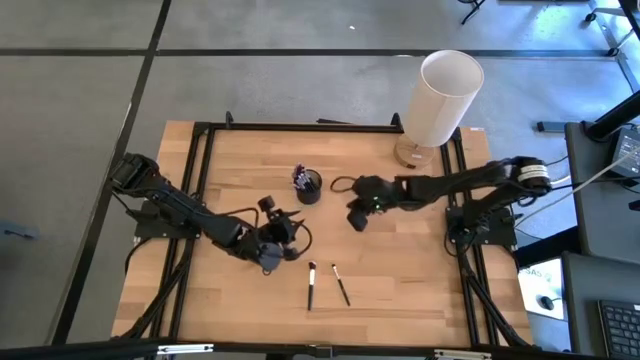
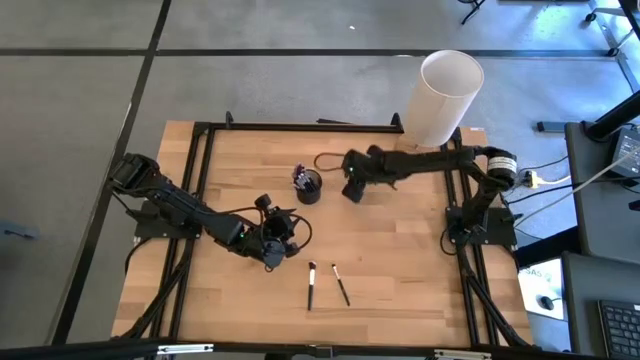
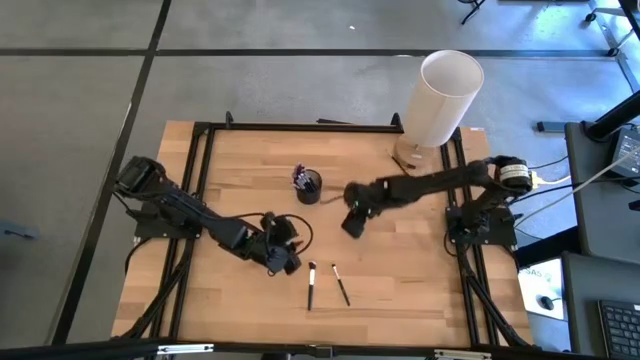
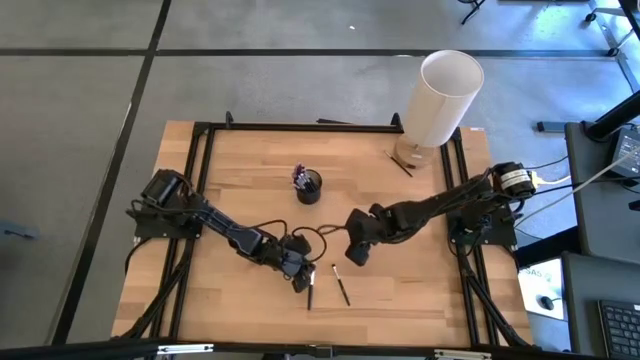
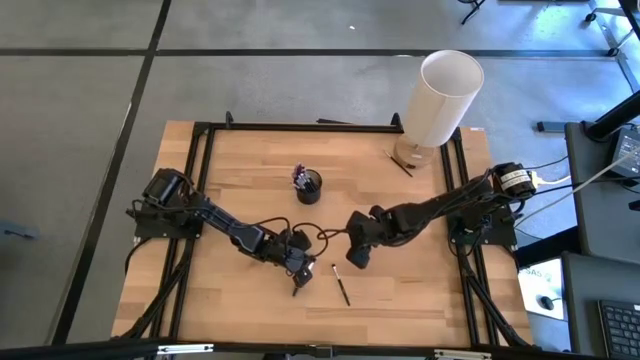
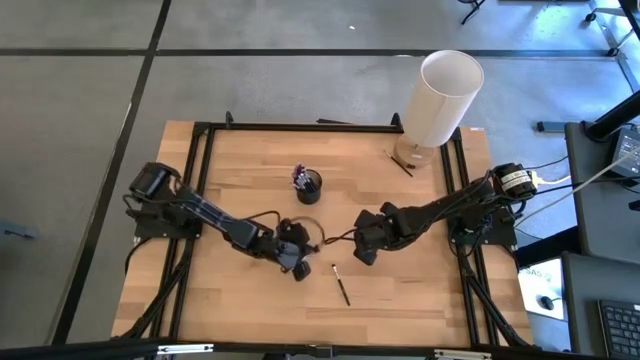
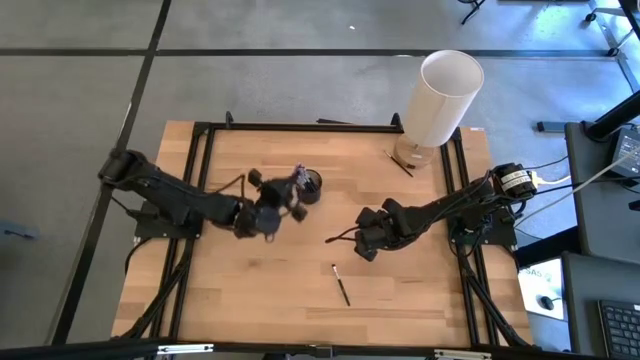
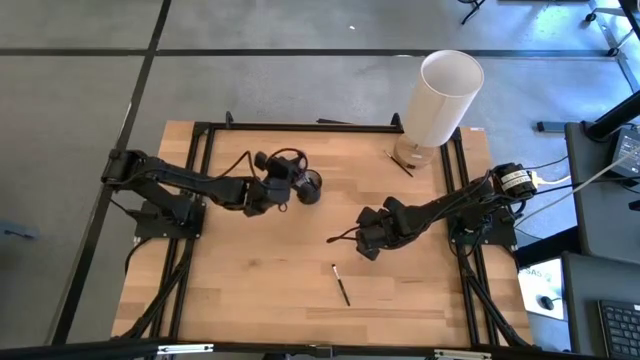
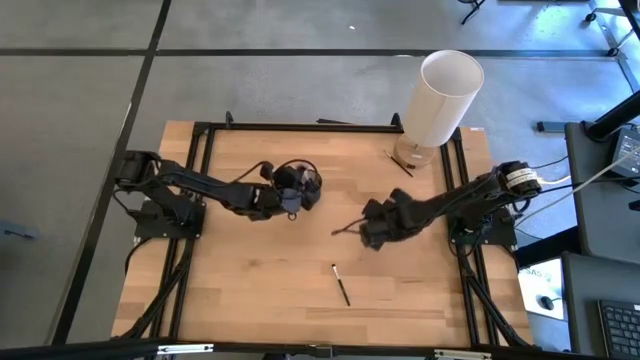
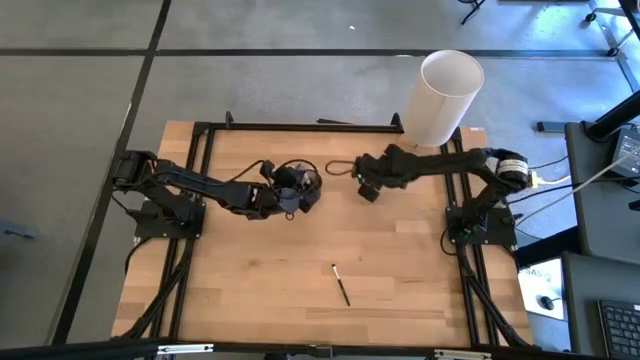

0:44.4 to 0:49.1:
Task: Put items in baskets/containers
Put the black powder brush into the black pen holder

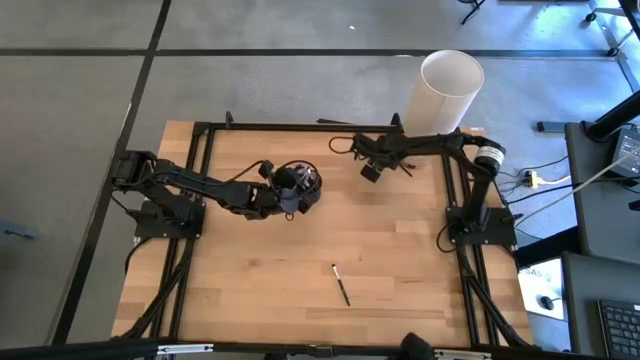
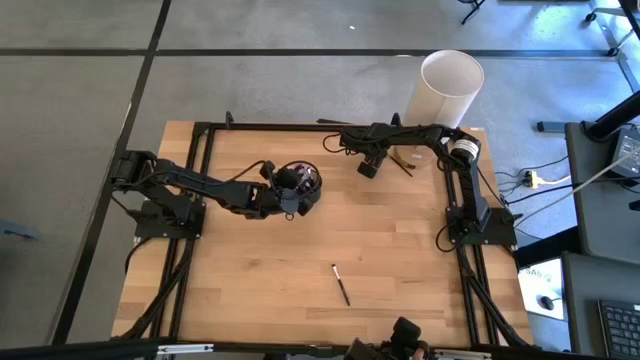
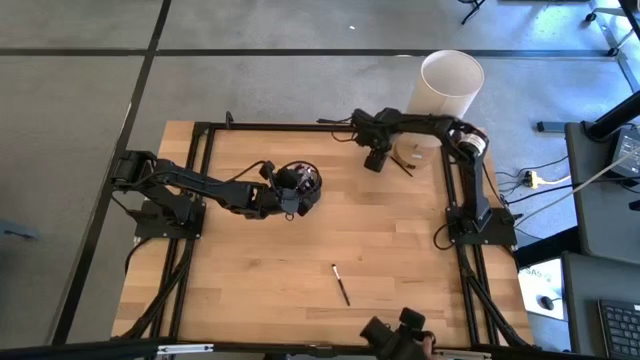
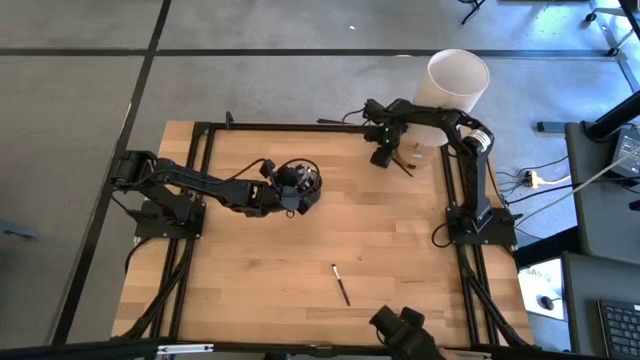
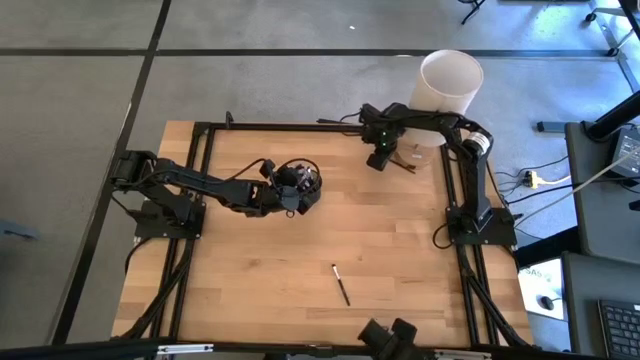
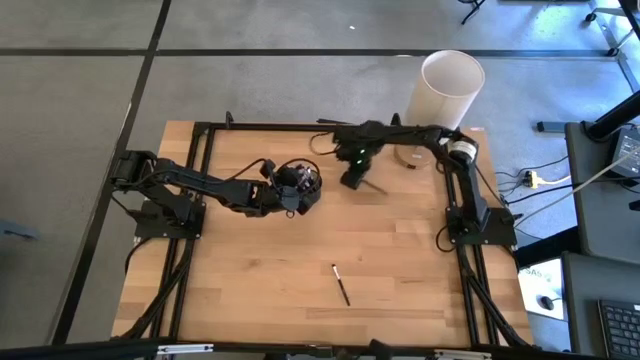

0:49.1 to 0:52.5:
Put the black eyeshadow brush into the black pen holder

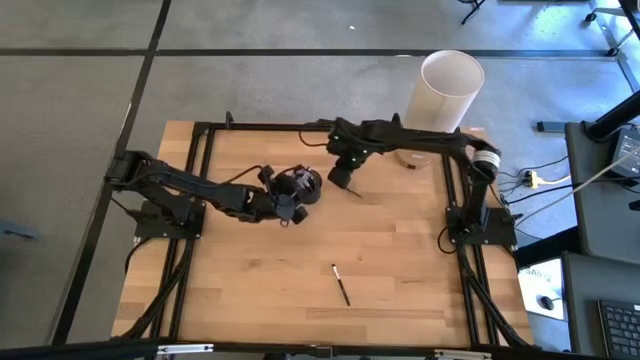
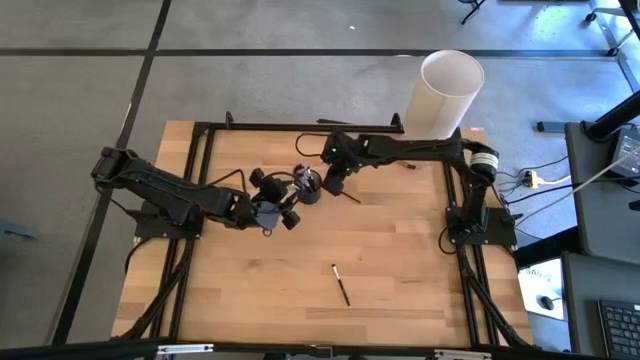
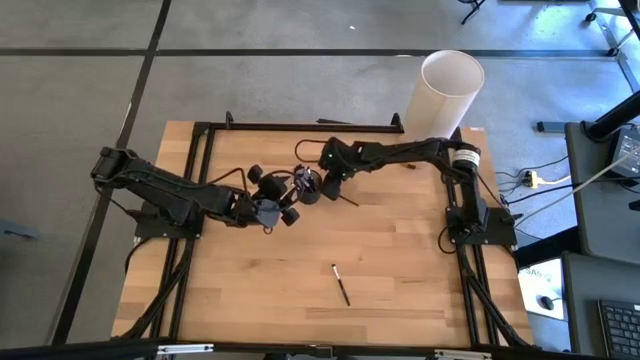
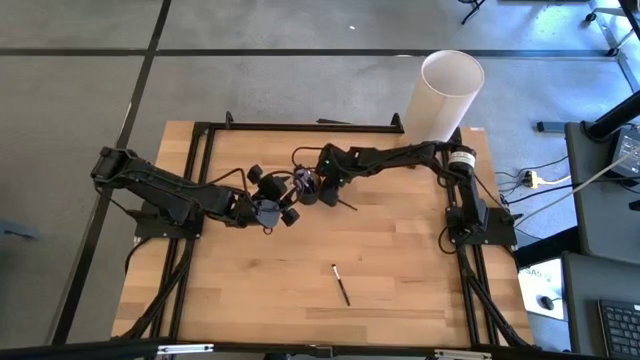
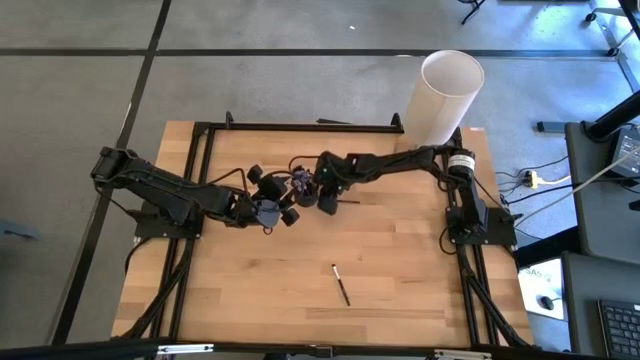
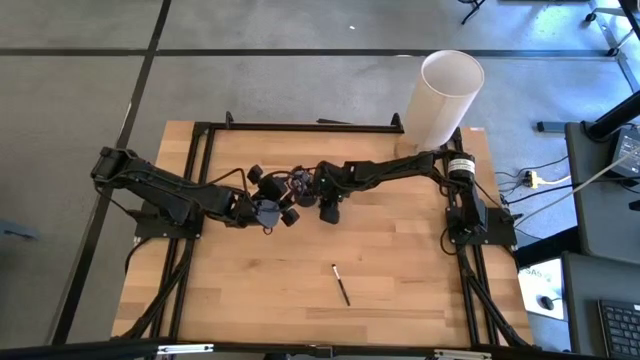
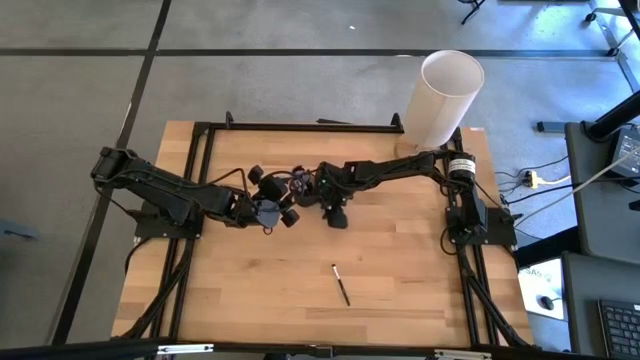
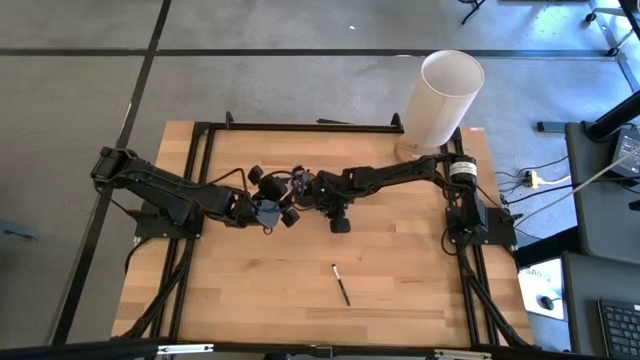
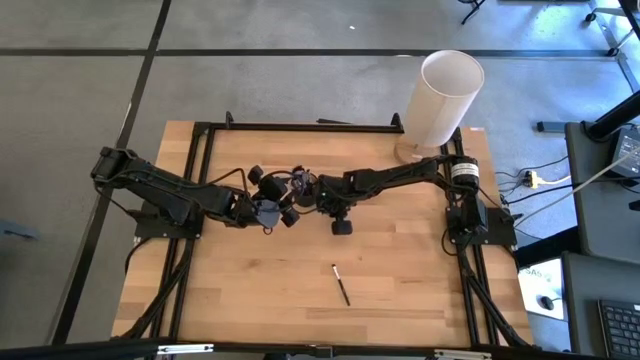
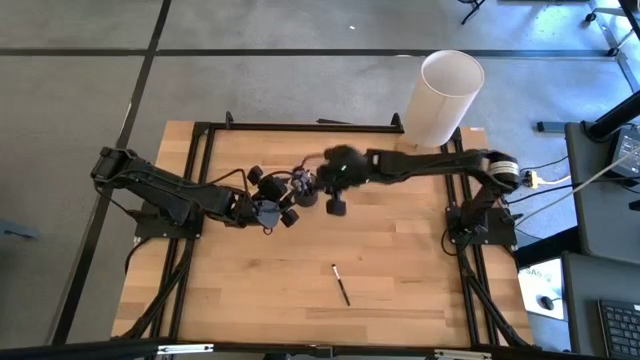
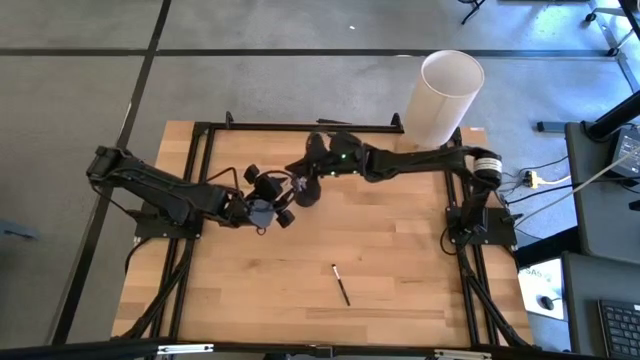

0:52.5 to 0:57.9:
Put the black eyeshadow brush into the black pen holder

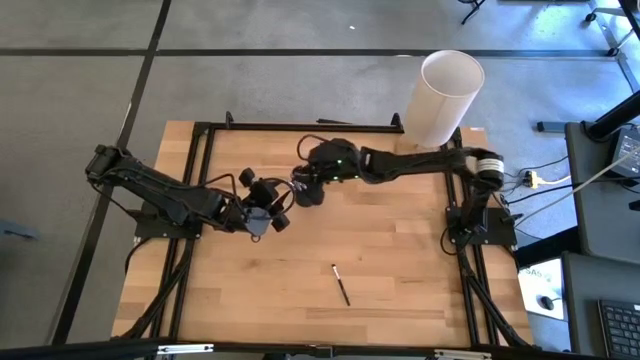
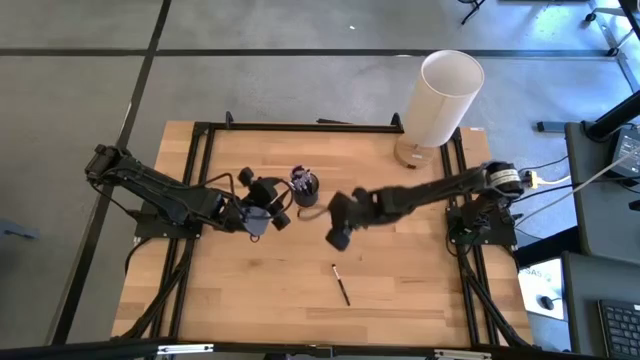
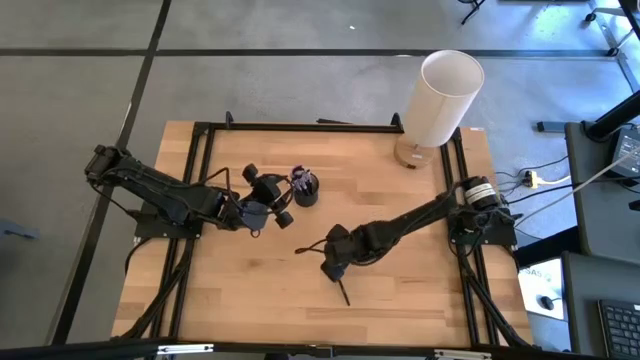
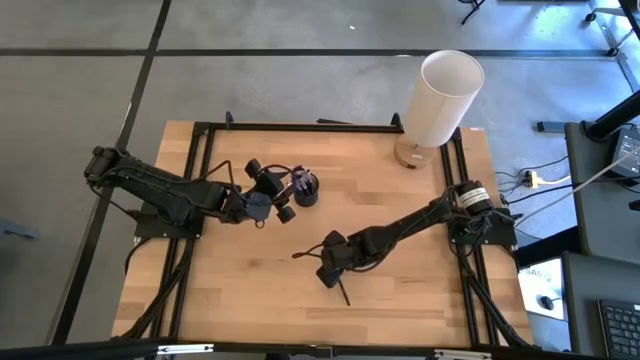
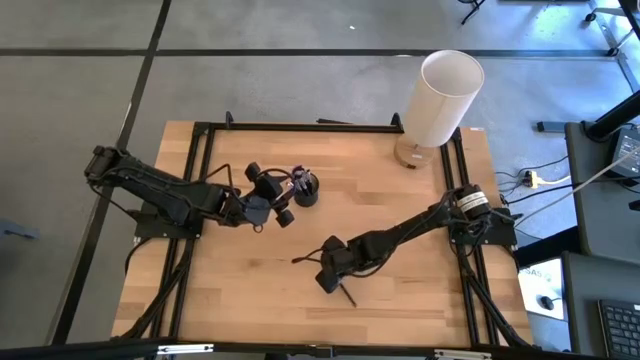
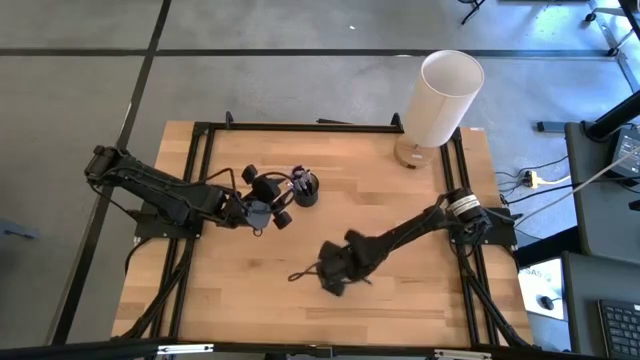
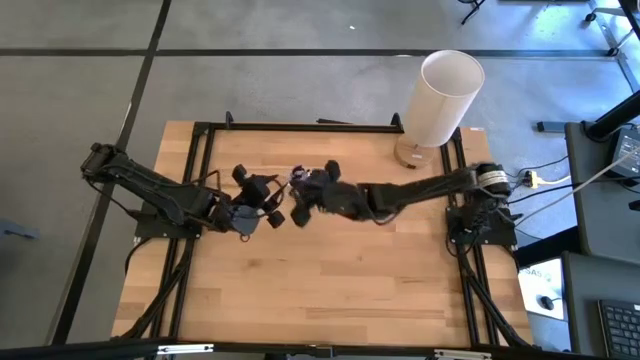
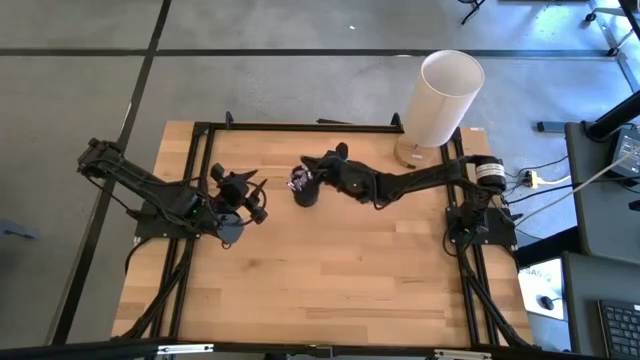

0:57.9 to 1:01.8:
Put the black eyeshadow brush into the black pen holder

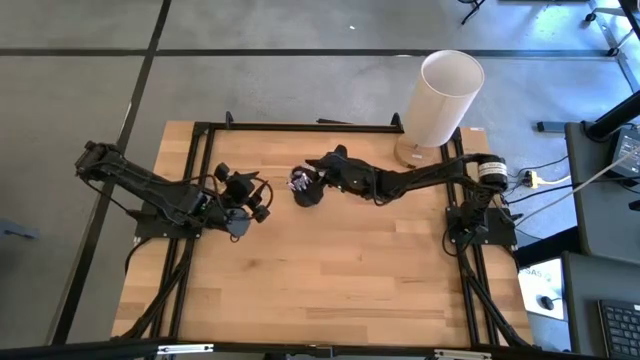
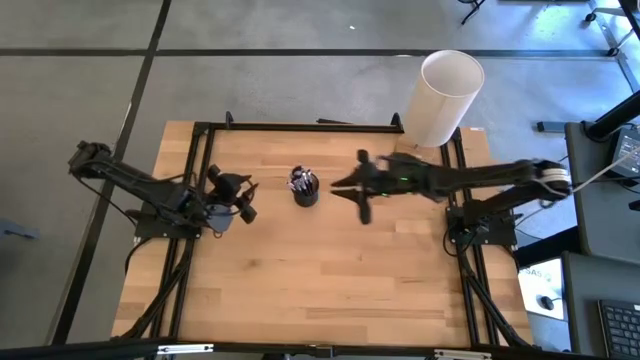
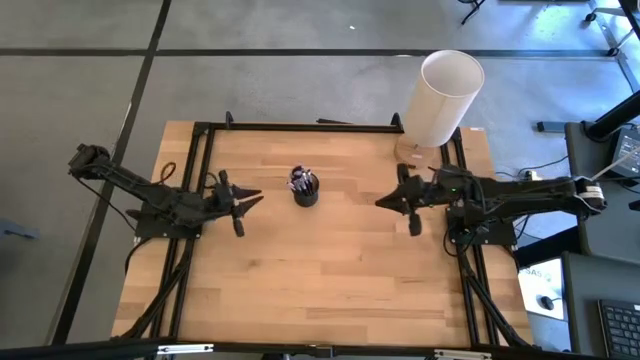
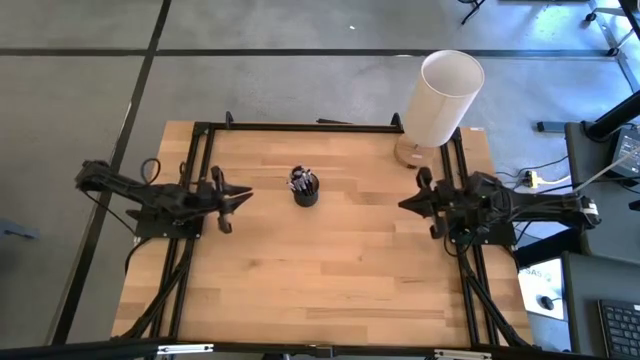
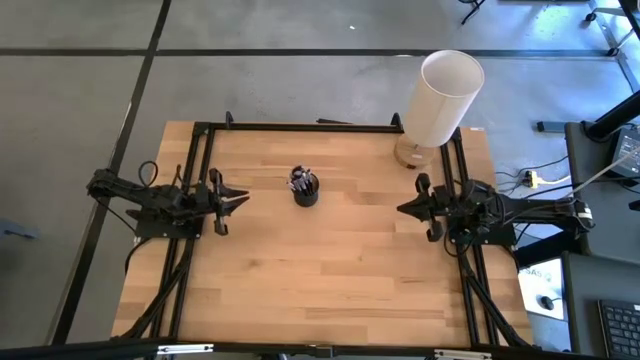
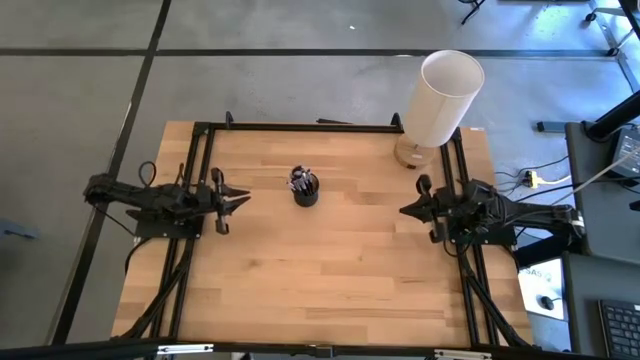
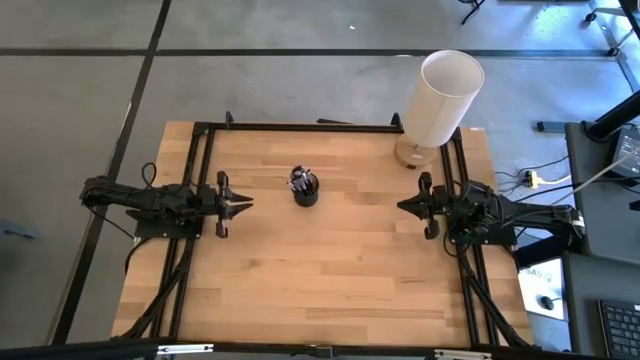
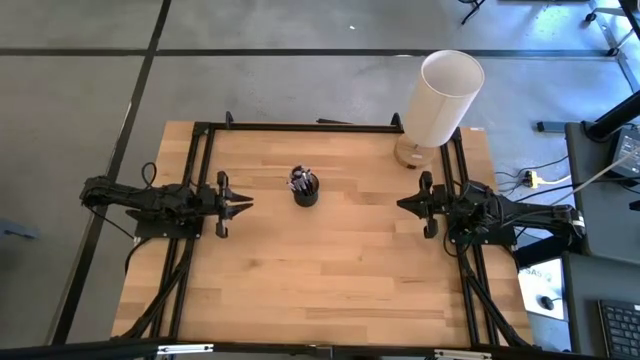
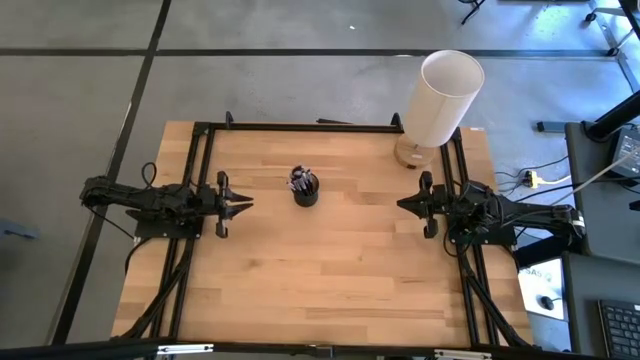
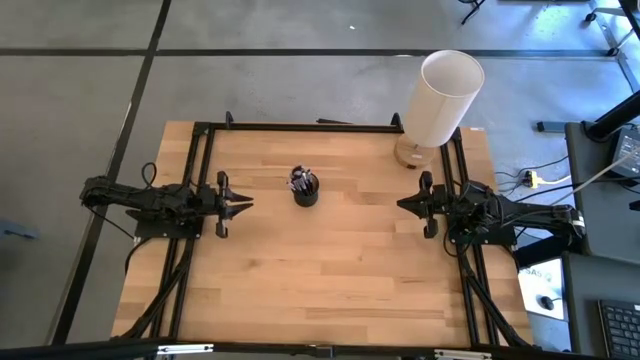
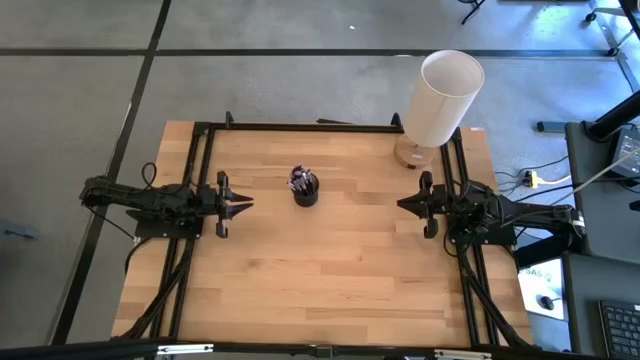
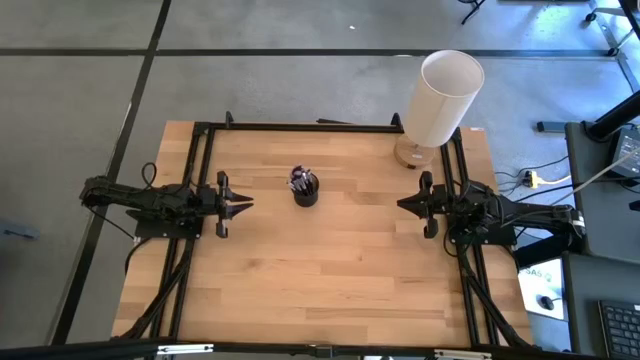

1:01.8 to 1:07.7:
Return To Home Position
